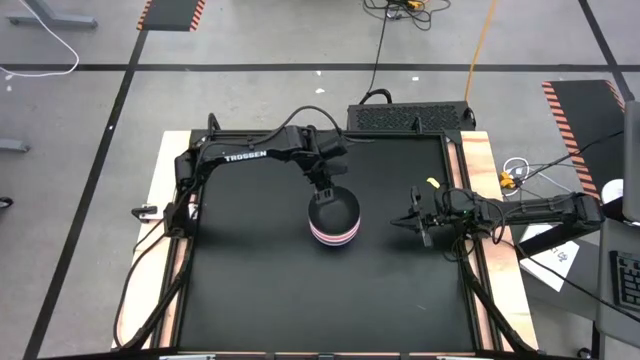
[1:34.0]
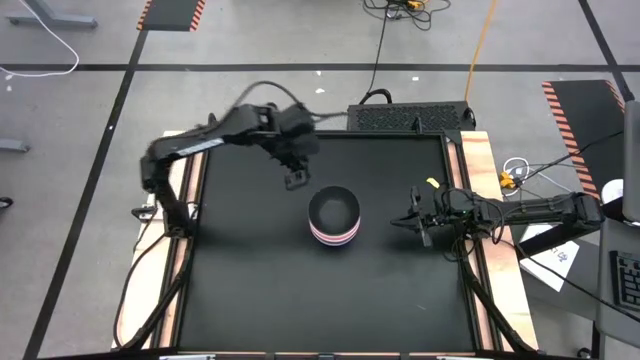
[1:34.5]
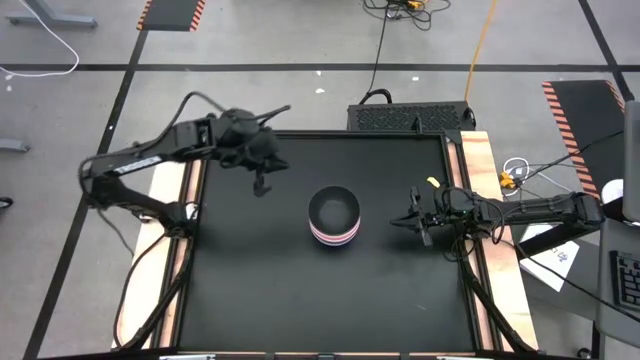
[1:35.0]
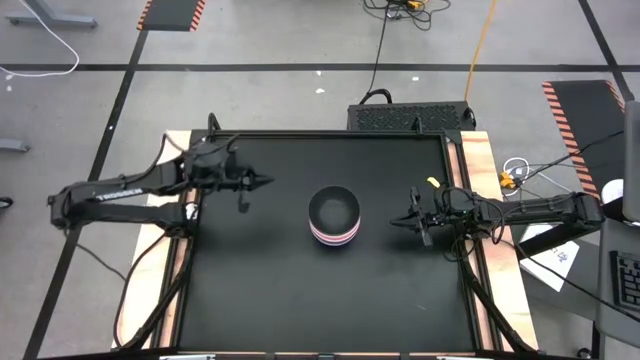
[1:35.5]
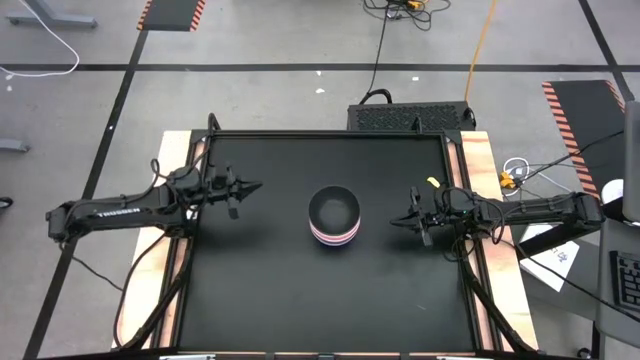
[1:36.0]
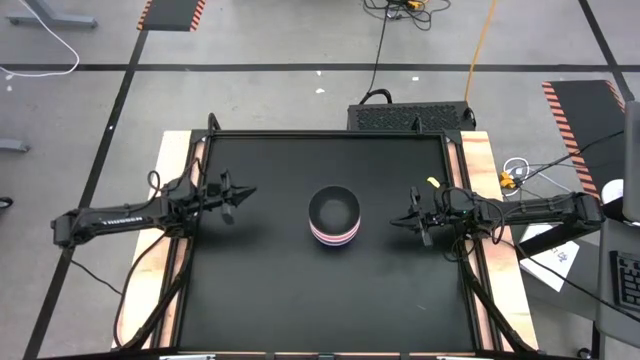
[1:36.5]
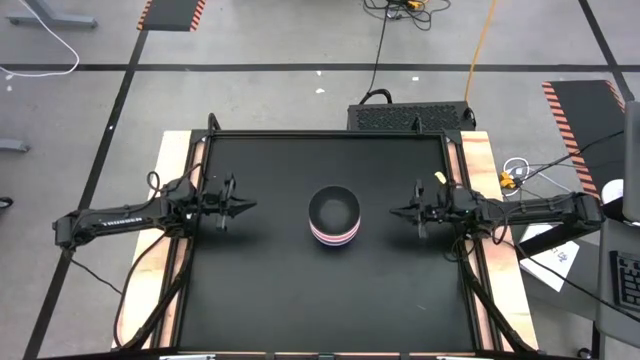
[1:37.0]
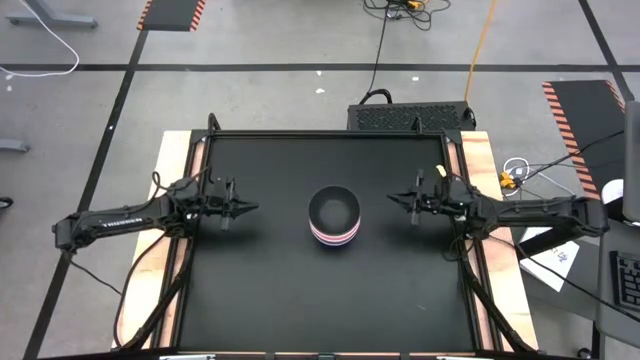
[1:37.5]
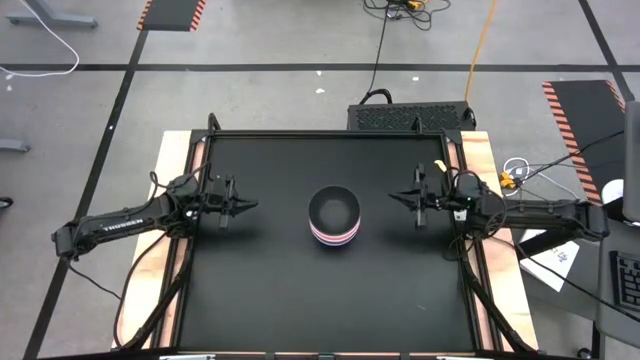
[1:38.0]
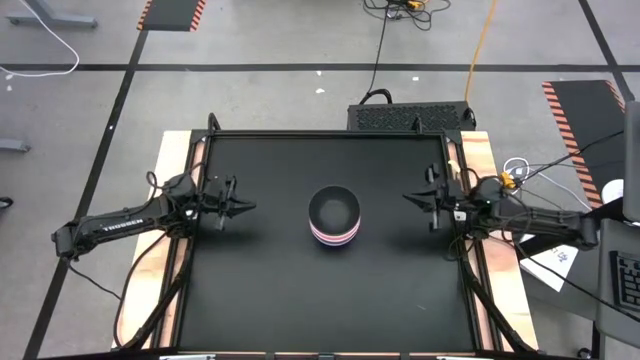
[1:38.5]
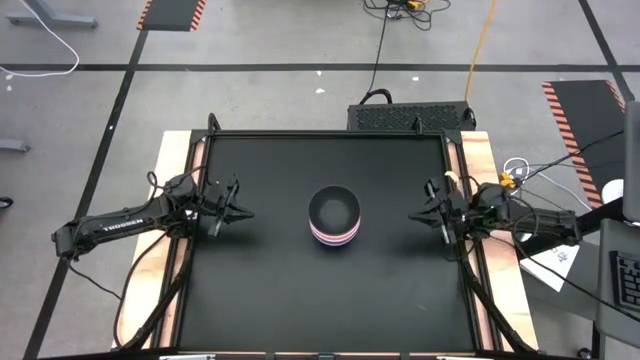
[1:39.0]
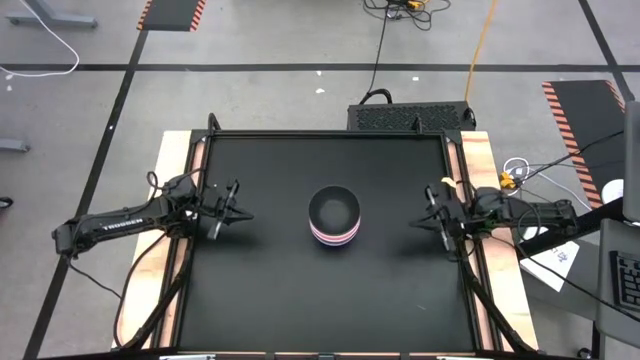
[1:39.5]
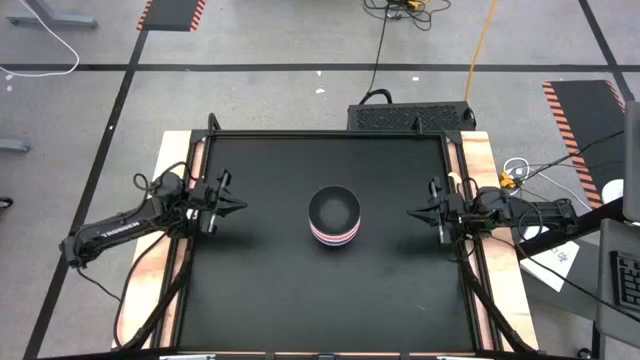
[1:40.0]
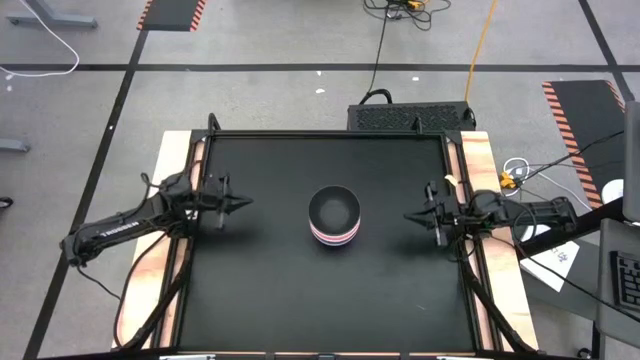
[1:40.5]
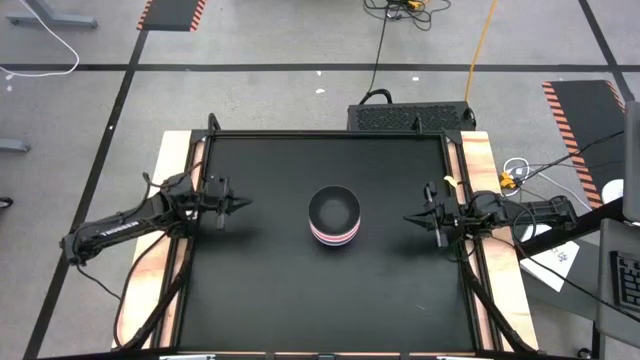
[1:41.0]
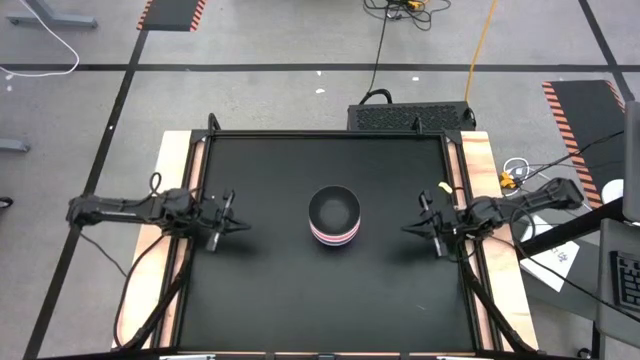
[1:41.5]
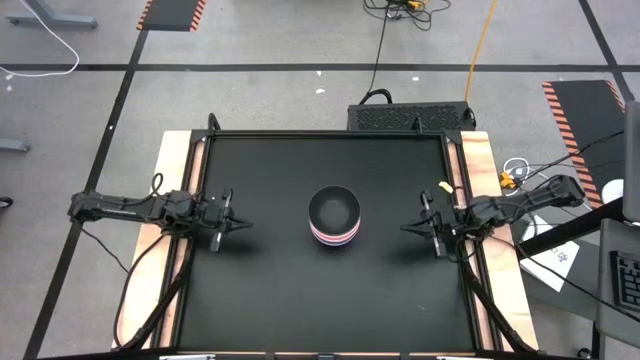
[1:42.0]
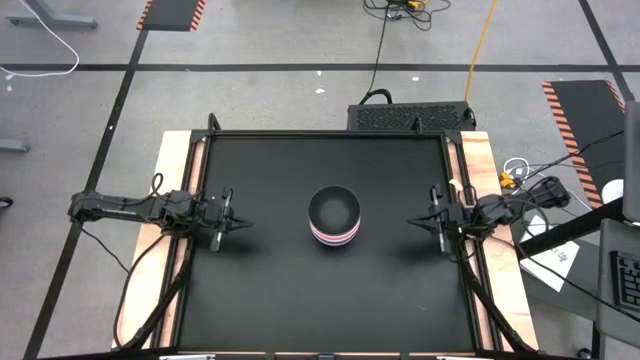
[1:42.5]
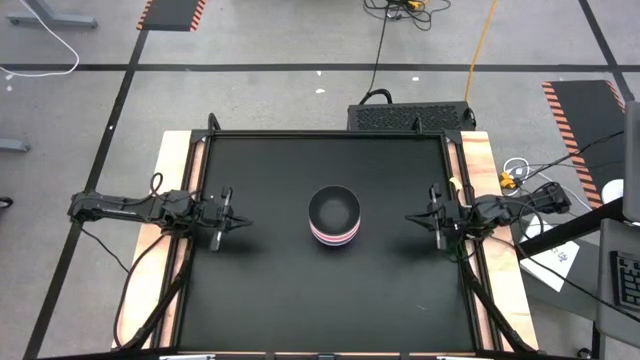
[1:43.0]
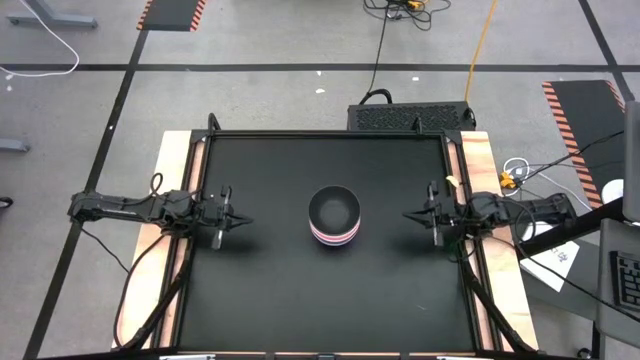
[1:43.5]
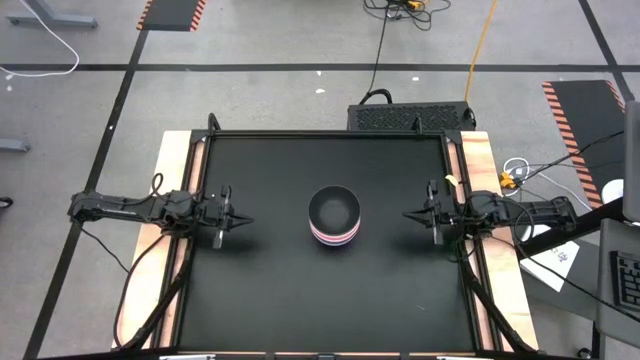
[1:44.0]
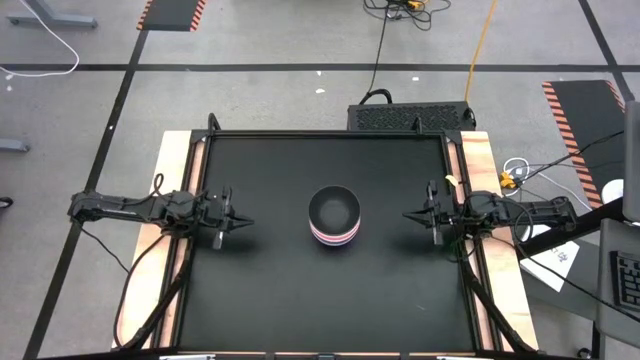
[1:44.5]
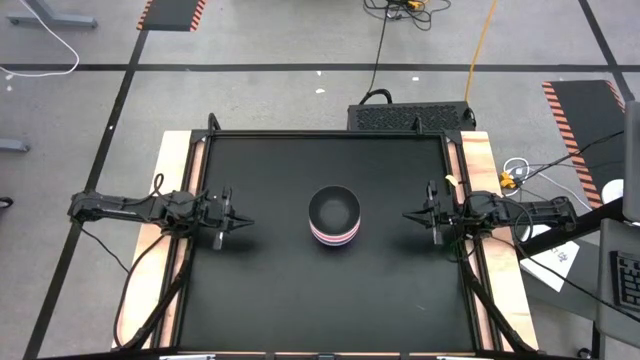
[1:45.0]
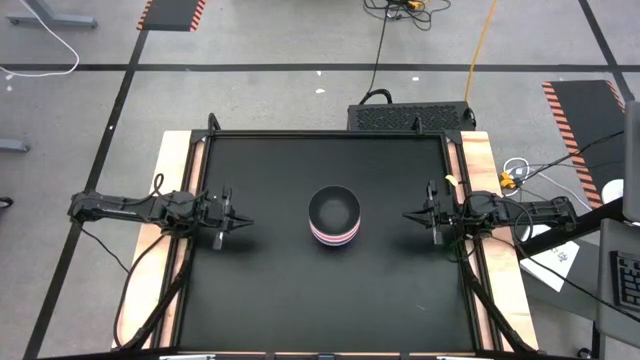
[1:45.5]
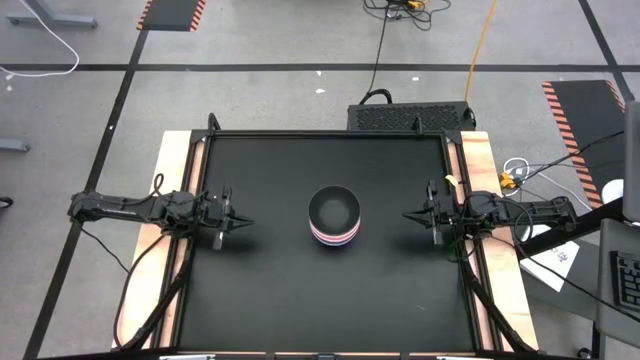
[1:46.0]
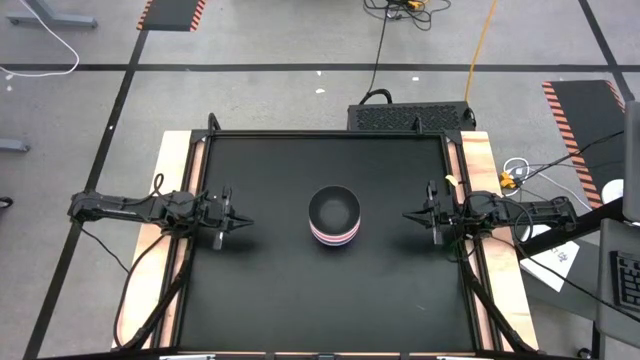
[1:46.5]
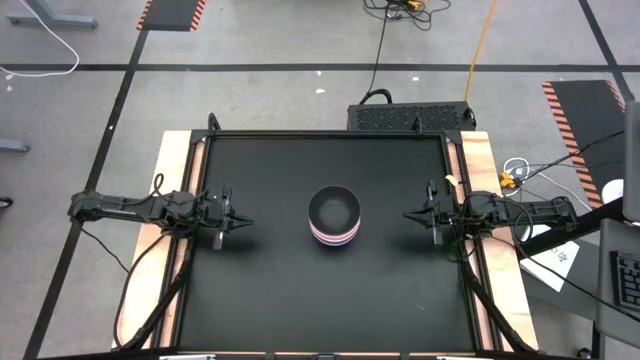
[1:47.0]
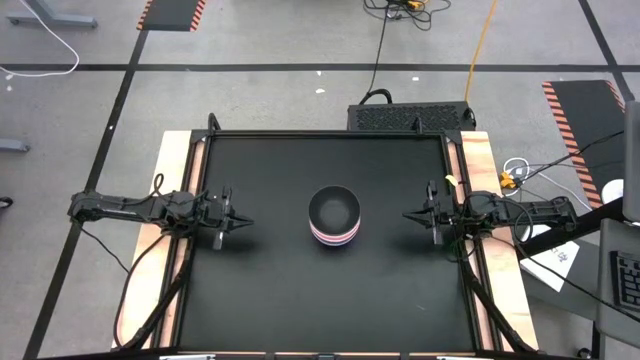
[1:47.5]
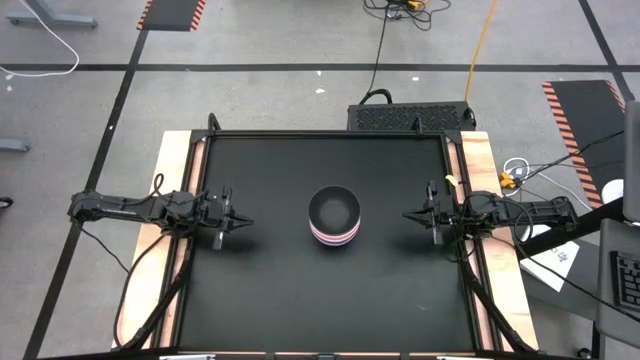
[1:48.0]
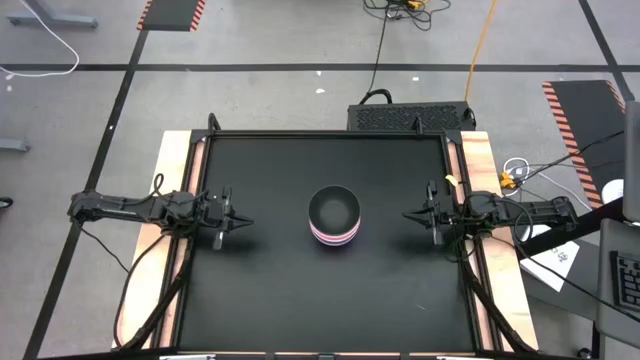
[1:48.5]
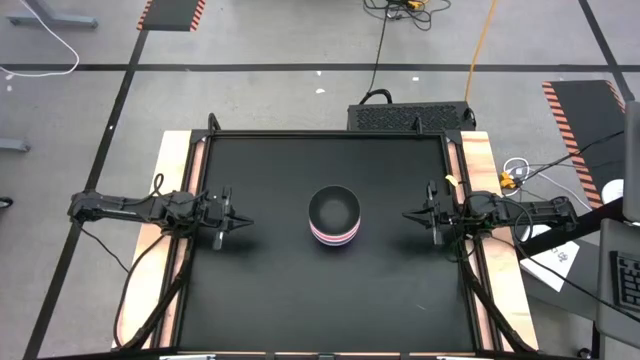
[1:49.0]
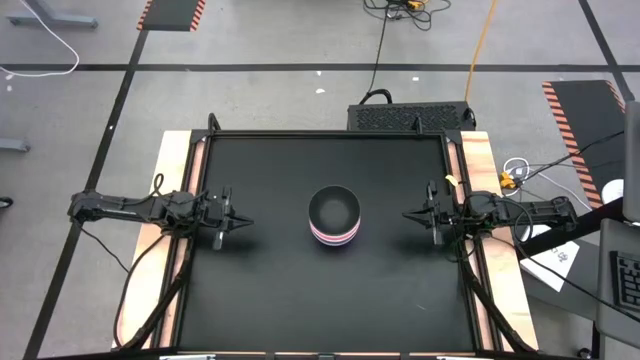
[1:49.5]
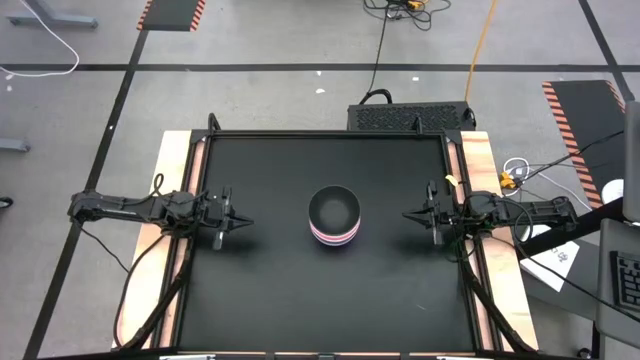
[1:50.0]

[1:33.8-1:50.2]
Task: Nest bowls inside each other
Return to Home Position

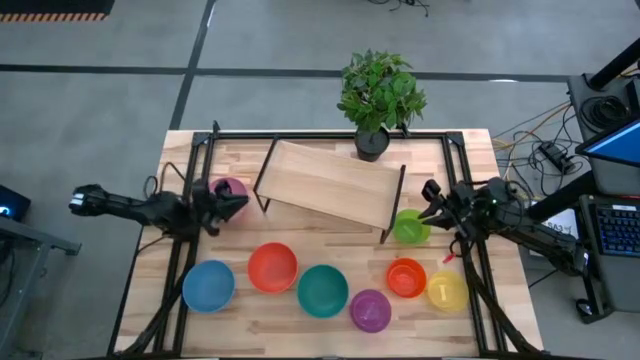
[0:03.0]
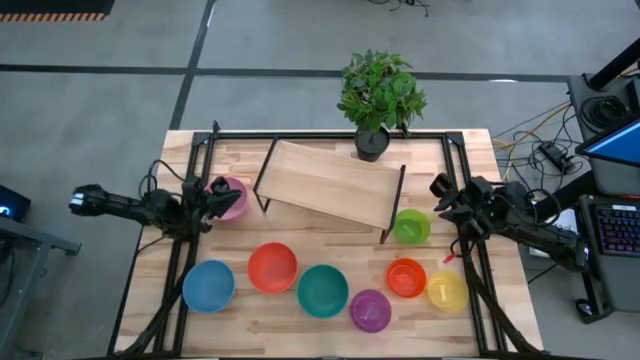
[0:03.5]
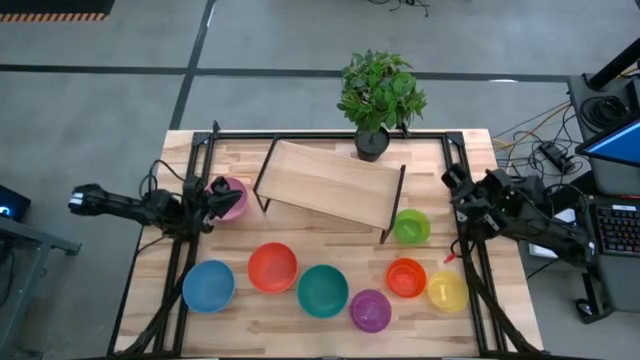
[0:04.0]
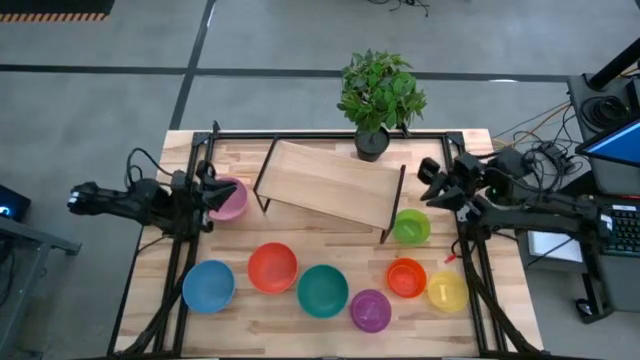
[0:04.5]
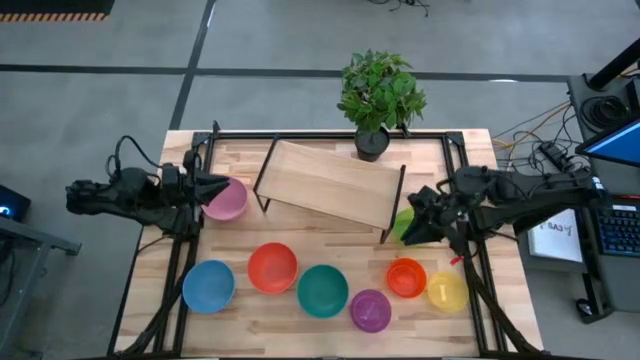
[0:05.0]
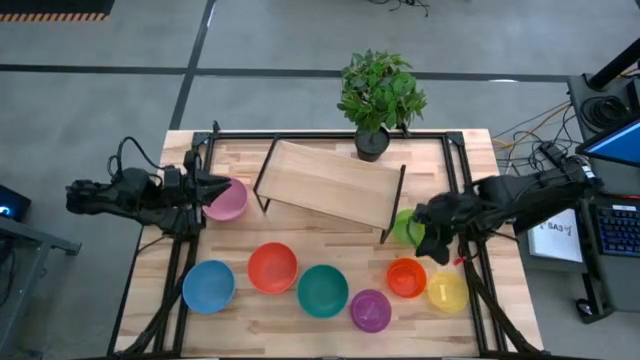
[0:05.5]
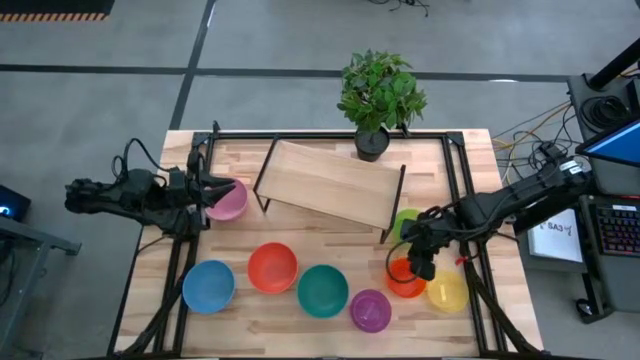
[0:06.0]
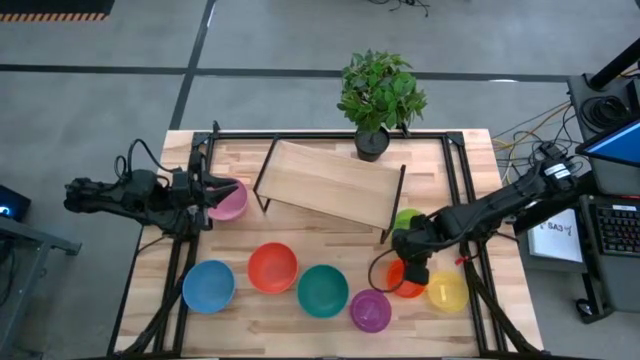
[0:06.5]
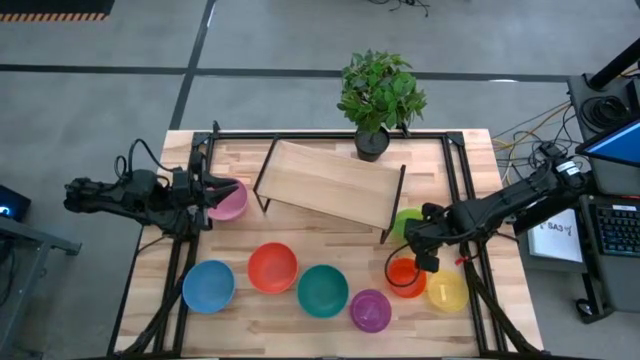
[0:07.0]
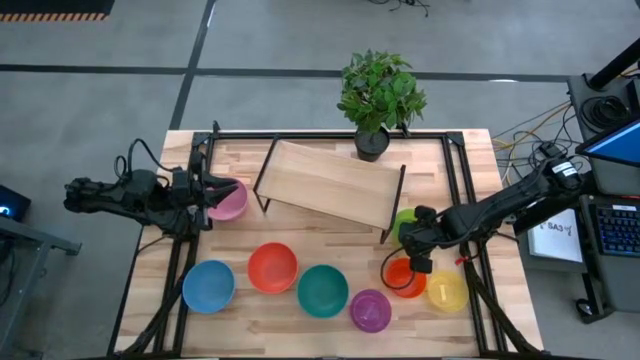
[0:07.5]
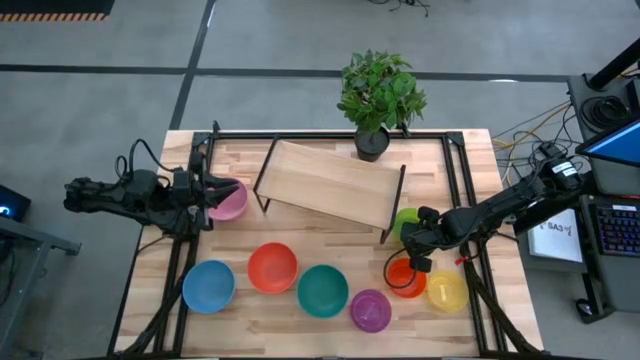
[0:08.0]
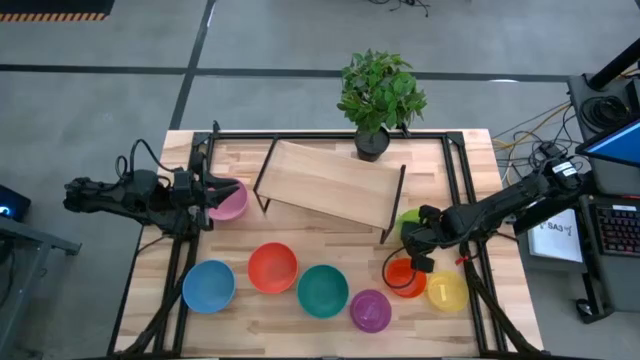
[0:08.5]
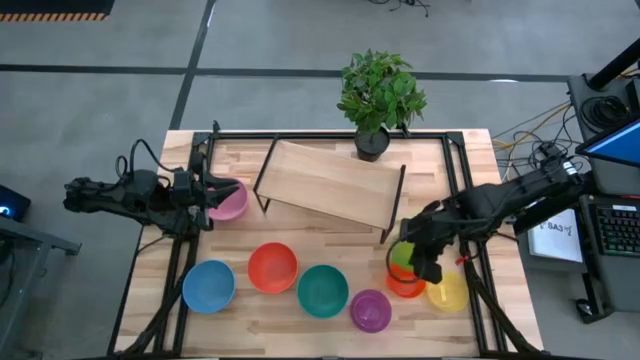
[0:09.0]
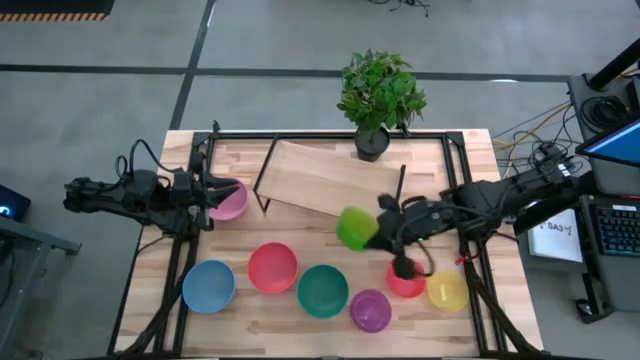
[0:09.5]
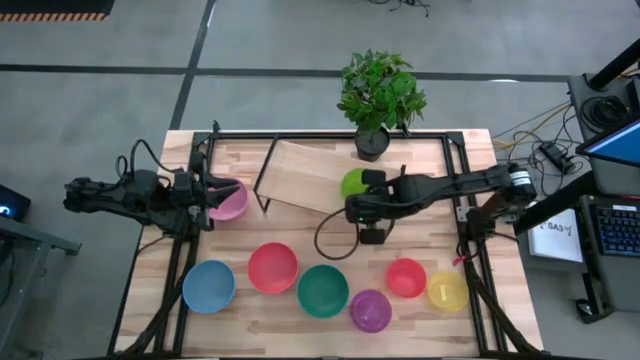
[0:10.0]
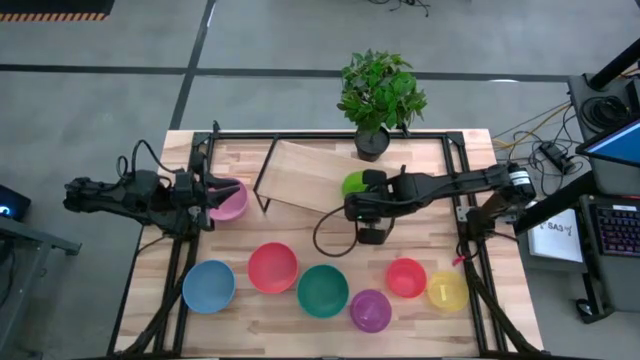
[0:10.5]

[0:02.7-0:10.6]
Task: Place and stack bowls onto a shelf
Put the green bowl on the shelf
